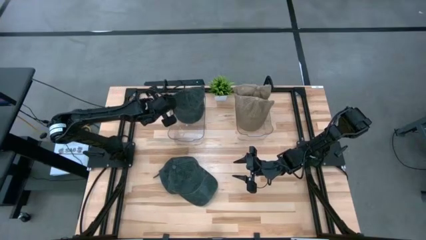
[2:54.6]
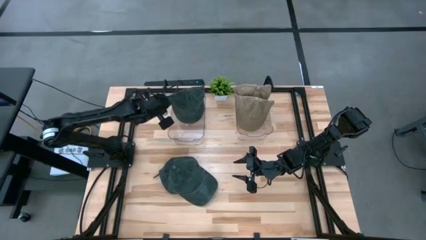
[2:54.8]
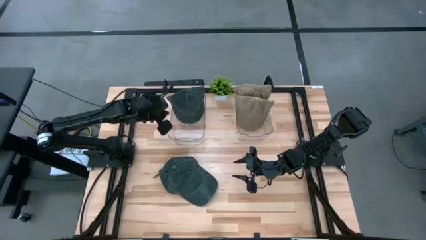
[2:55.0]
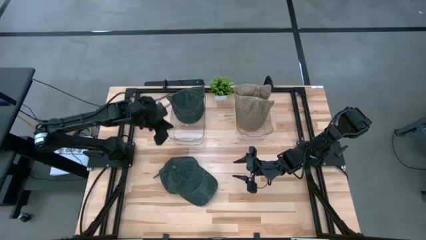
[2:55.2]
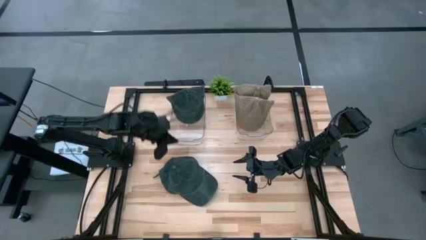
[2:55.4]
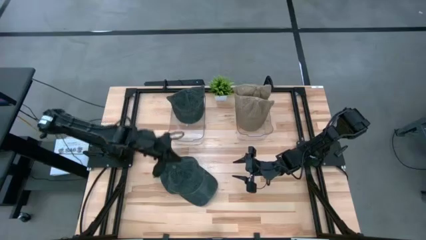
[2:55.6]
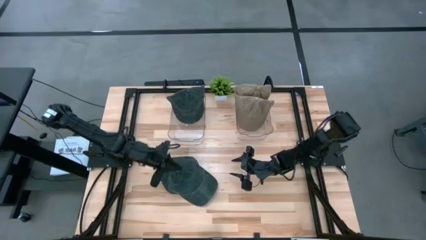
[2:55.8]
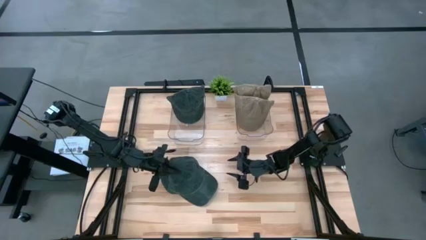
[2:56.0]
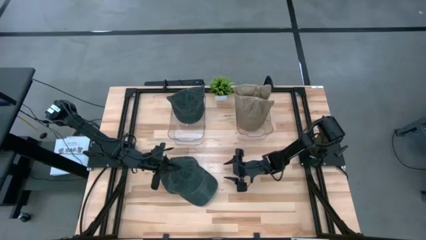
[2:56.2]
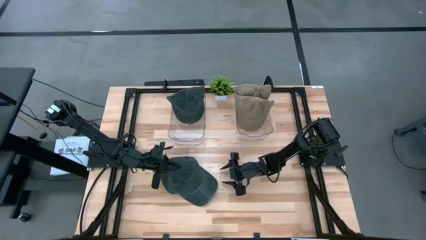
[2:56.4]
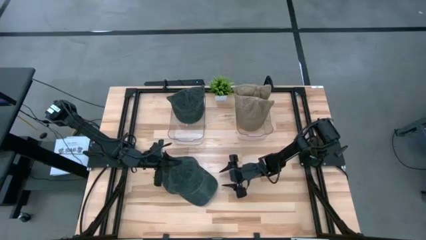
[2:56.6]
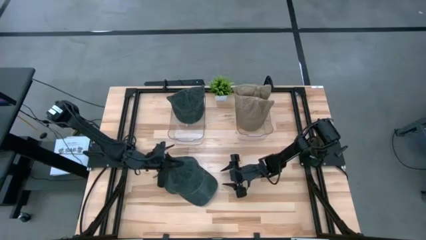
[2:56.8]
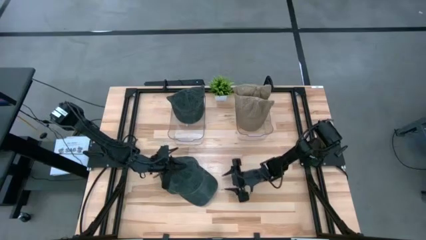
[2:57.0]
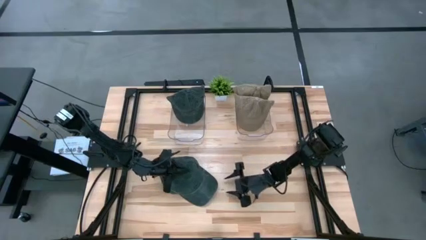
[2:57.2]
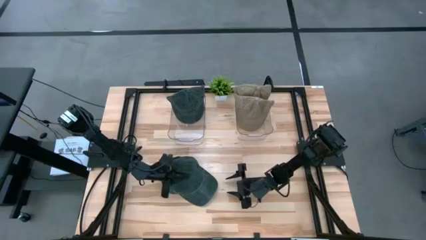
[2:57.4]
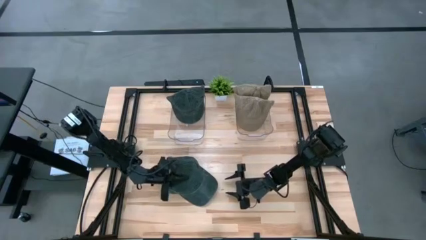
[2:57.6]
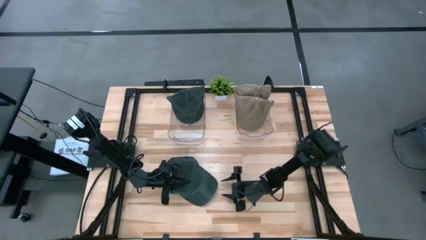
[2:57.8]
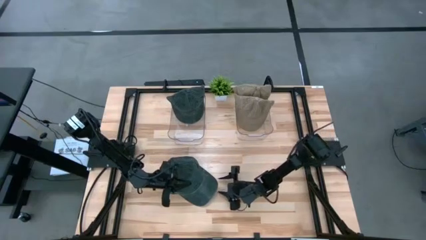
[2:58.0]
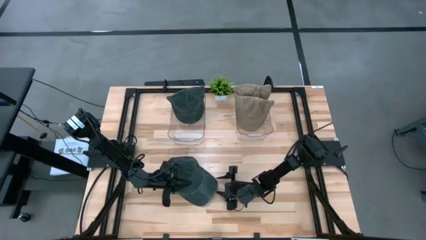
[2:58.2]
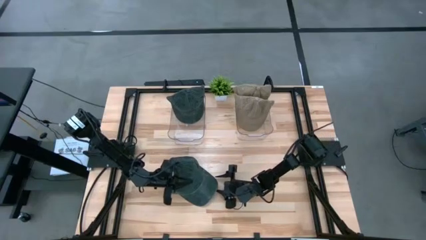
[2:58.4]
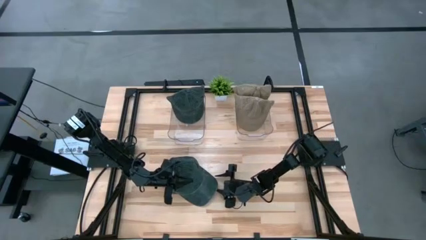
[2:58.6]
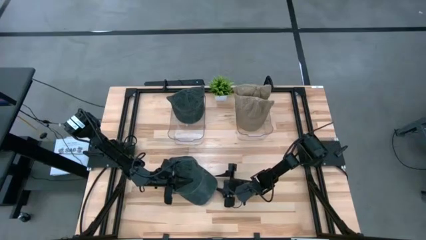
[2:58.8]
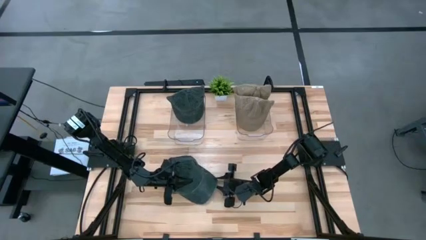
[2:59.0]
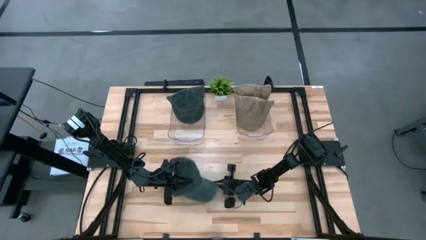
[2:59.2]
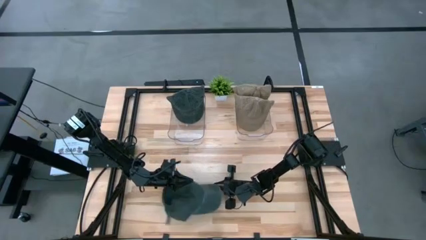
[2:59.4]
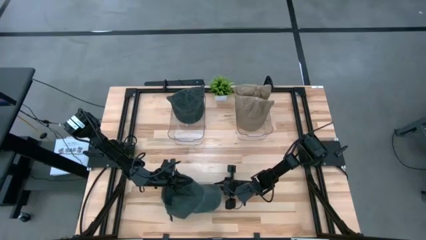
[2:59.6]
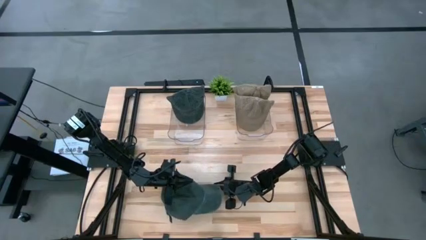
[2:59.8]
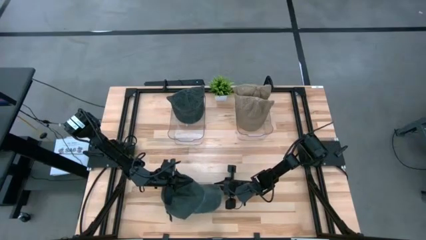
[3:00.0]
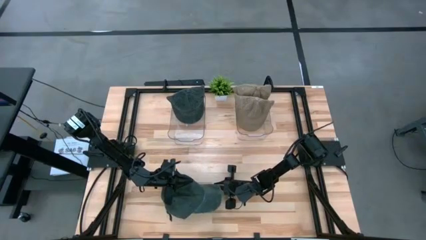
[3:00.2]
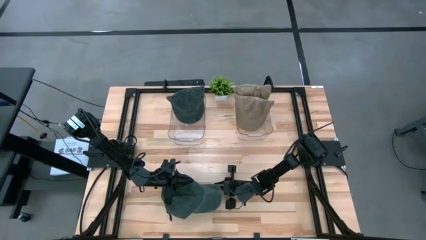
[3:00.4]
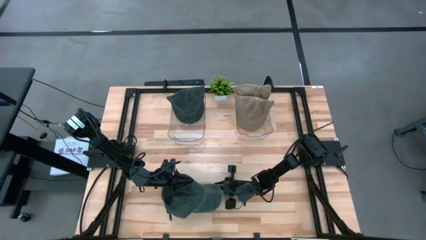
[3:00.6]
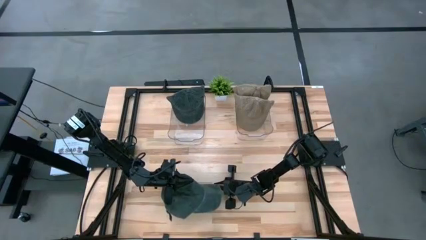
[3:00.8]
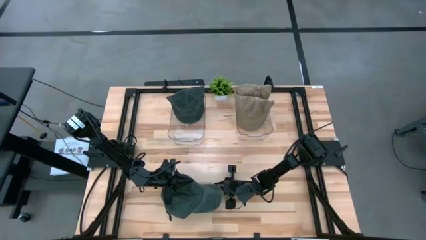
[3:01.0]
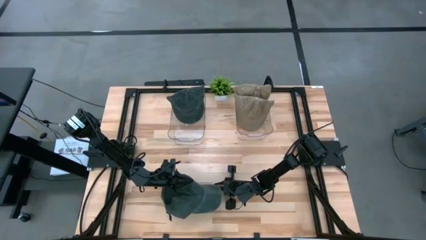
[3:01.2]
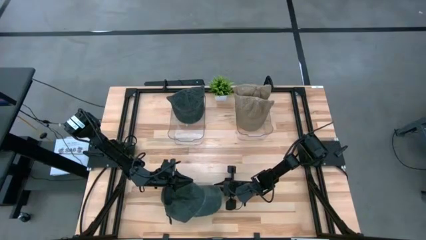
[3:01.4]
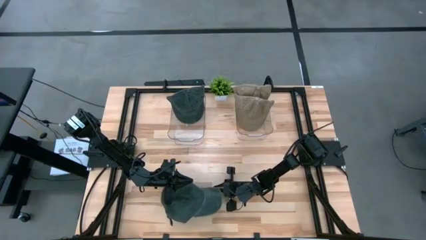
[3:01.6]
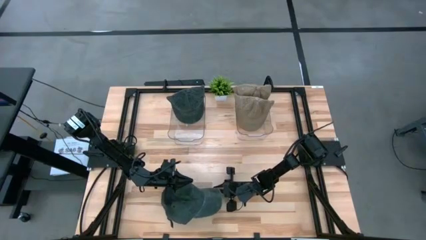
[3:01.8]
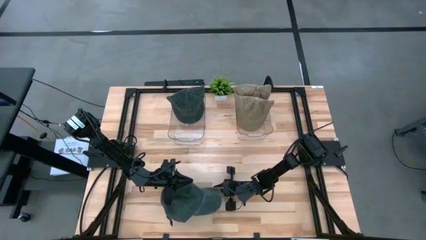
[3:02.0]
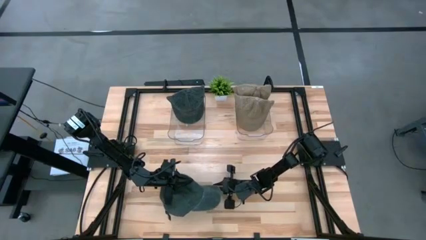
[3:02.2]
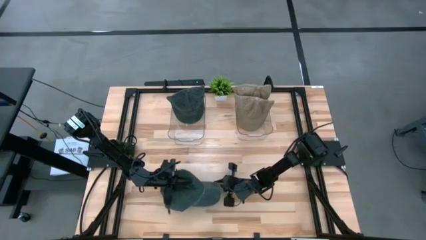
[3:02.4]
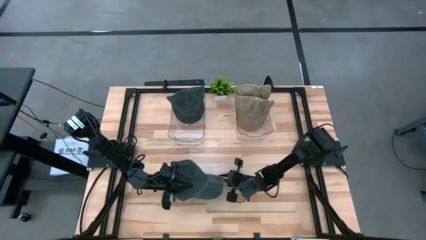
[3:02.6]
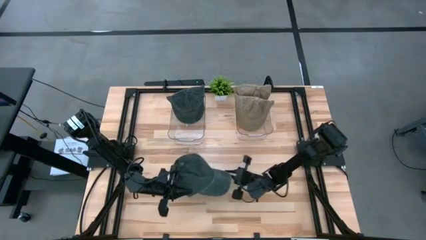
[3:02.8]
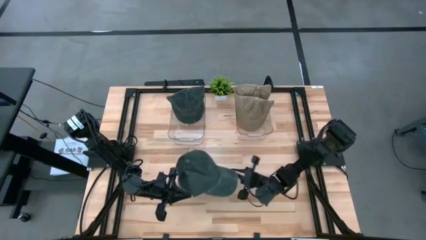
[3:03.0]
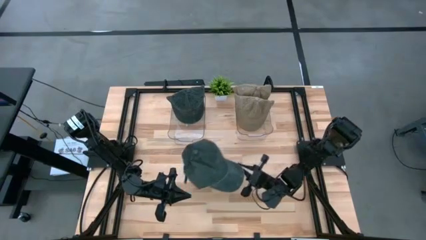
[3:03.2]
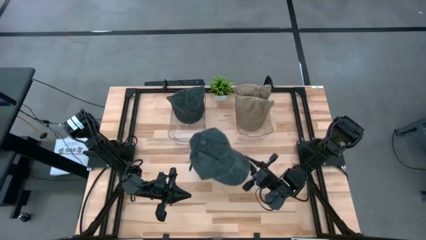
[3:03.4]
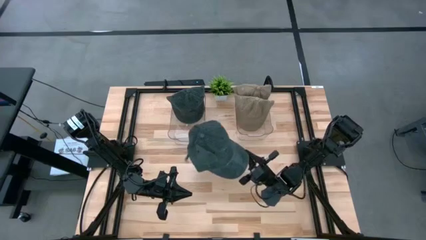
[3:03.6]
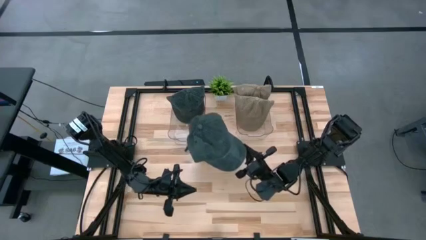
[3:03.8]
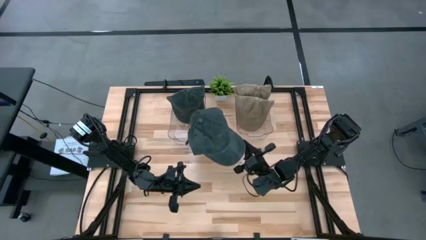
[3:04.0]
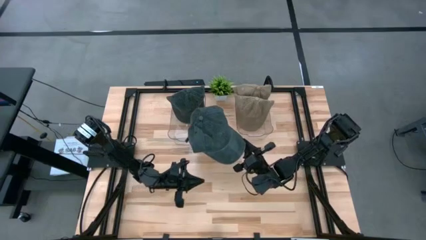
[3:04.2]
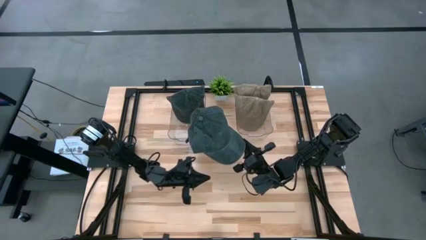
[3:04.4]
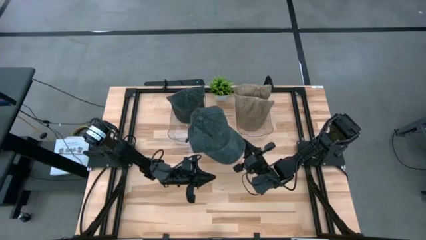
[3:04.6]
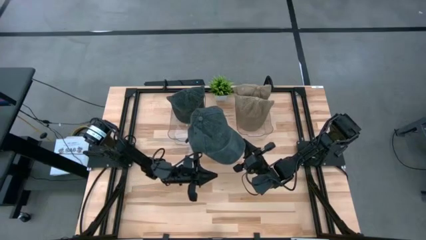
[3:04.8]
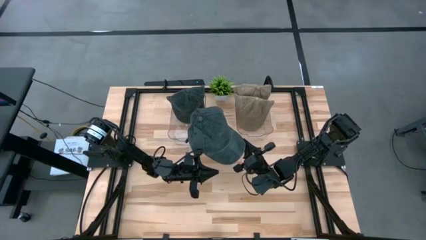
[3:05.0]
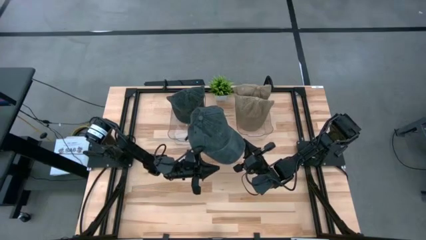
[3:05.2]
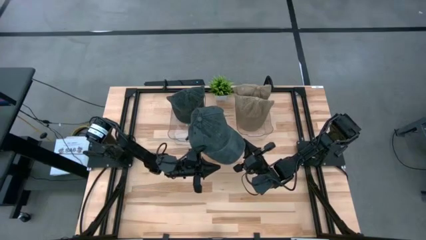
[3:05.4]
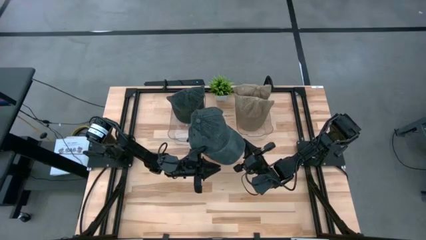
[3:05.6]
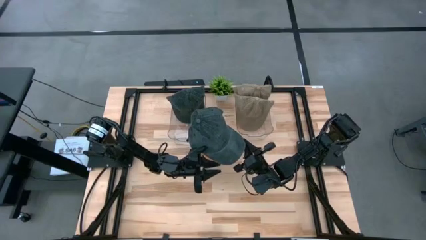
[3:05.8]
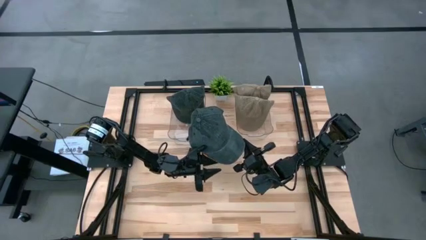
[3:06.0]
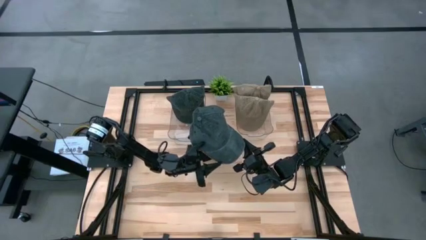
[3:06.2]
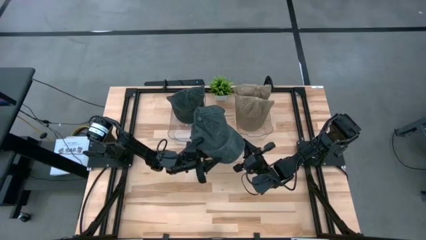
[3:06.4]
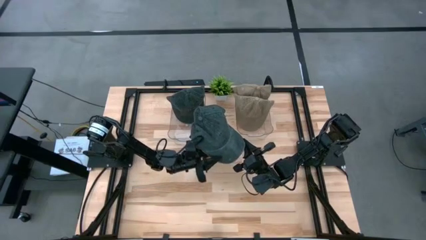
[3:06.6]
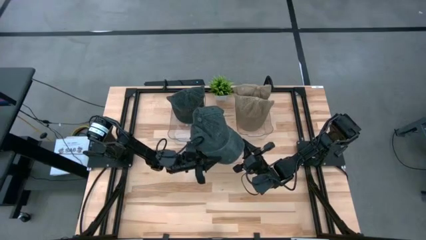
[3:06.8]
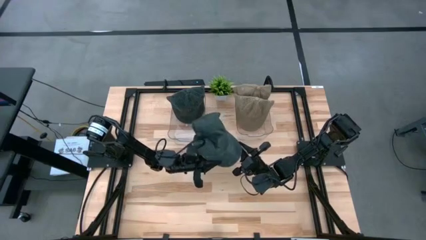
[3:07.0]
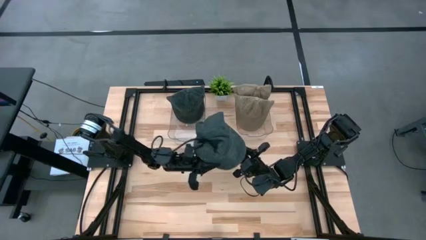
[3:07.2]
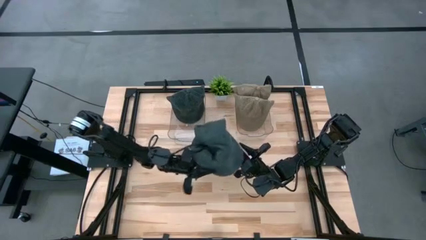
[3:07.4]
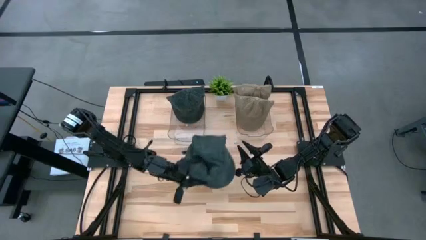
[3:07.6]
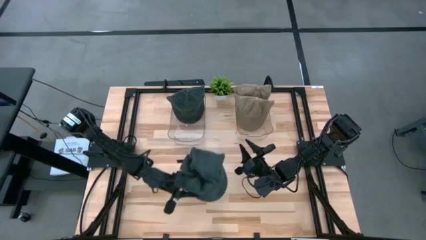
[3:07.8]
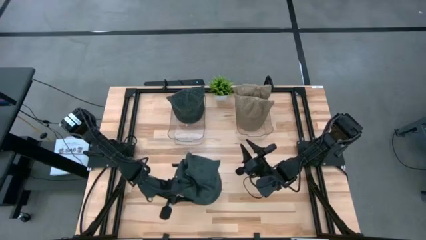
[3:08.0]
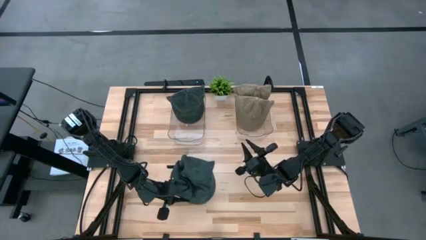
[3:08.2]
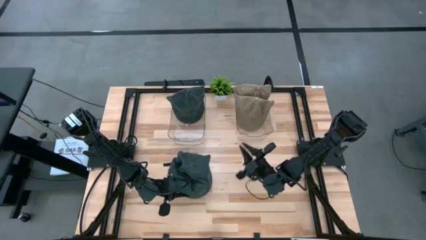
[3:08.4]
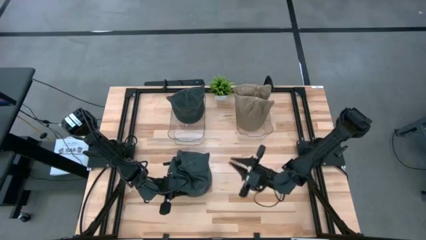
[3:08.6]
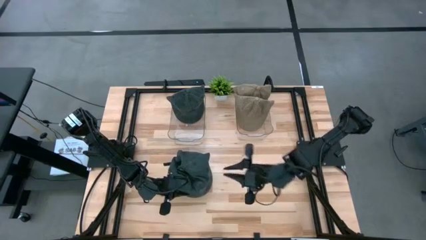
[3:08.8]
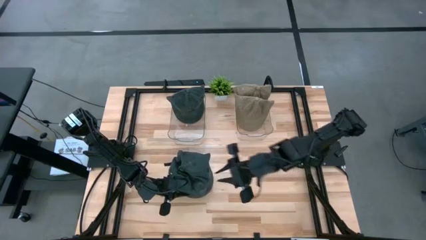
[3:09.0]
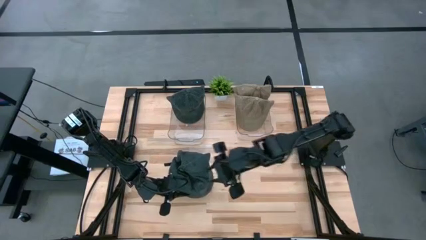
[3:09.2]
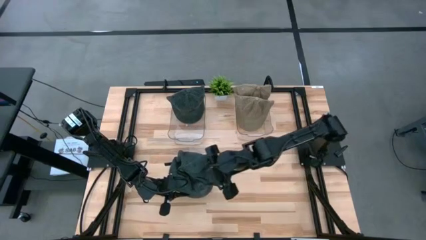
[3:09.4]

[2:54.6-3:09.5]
Task: Pick & Place hat
Put the black cap into the left transparent container
